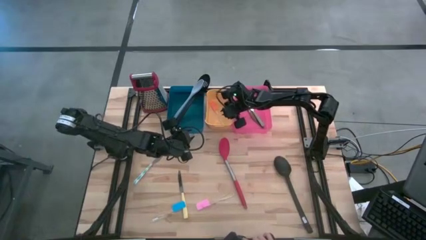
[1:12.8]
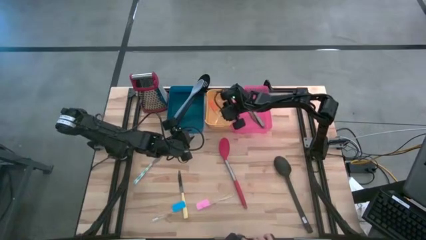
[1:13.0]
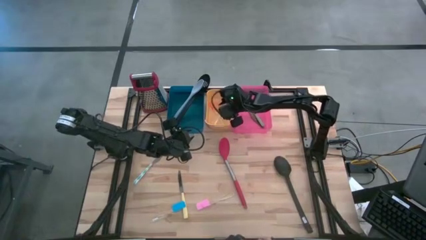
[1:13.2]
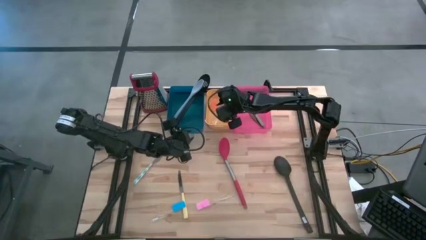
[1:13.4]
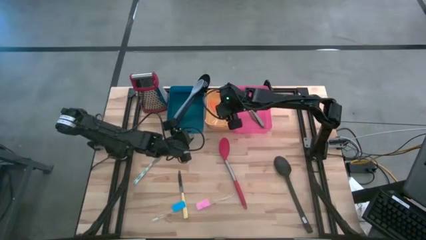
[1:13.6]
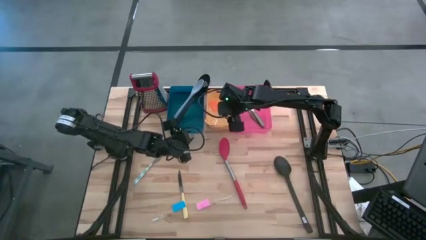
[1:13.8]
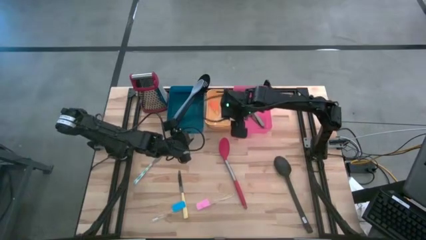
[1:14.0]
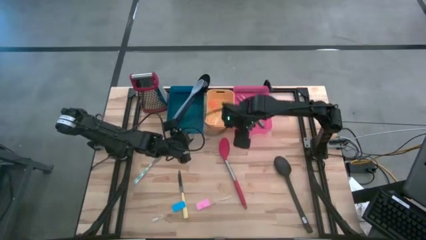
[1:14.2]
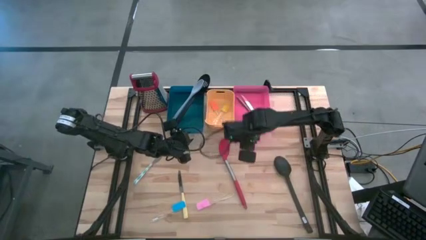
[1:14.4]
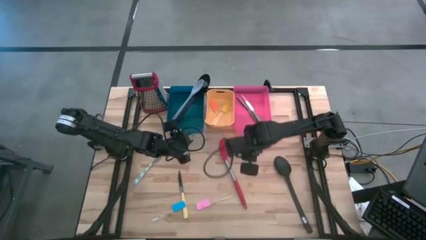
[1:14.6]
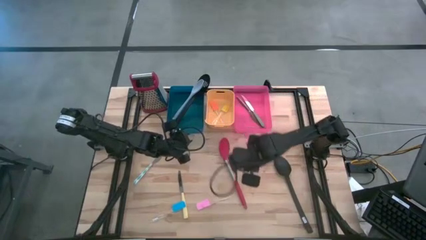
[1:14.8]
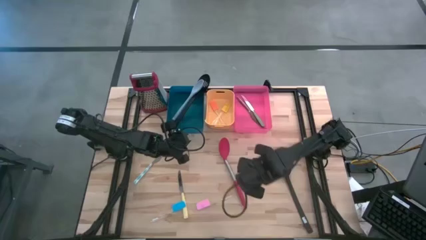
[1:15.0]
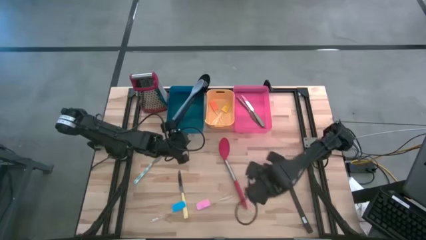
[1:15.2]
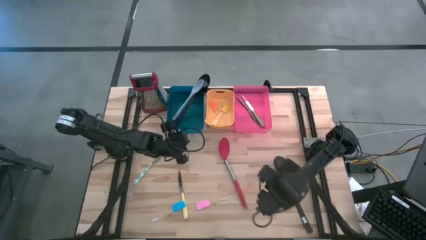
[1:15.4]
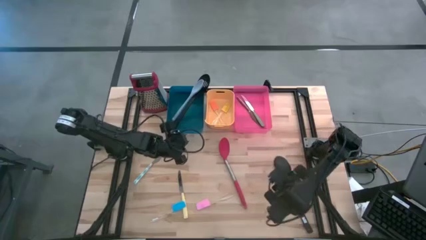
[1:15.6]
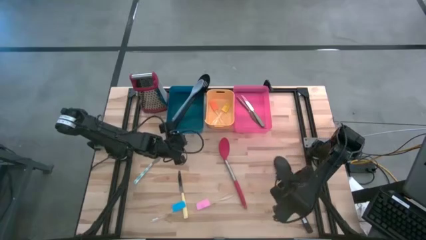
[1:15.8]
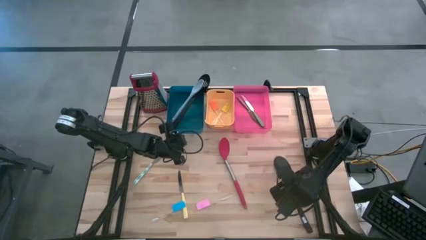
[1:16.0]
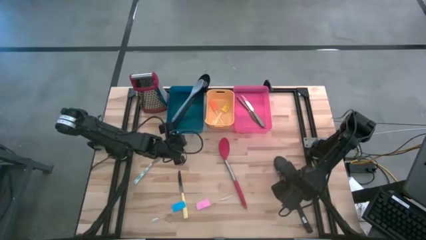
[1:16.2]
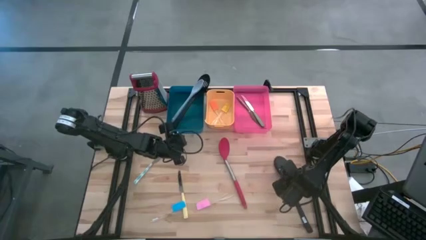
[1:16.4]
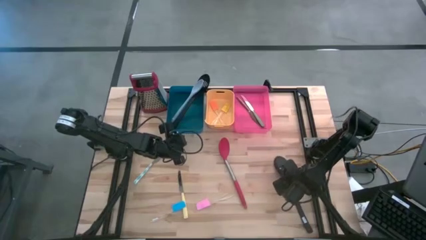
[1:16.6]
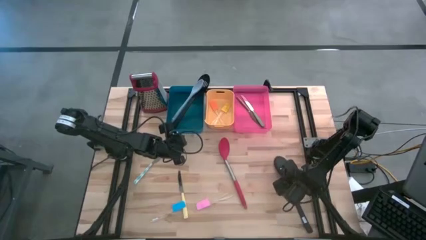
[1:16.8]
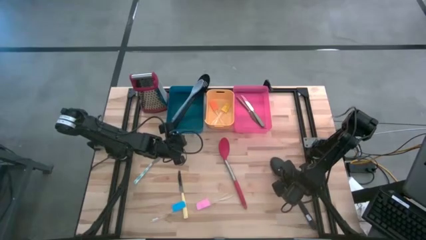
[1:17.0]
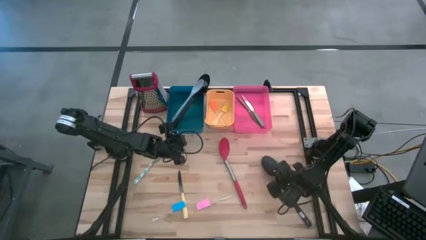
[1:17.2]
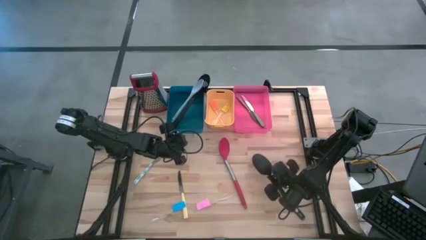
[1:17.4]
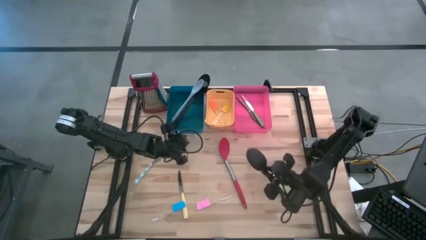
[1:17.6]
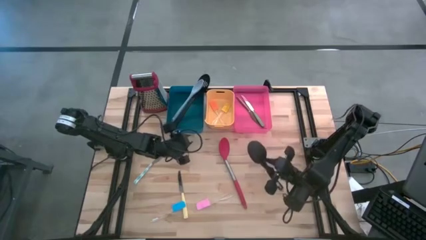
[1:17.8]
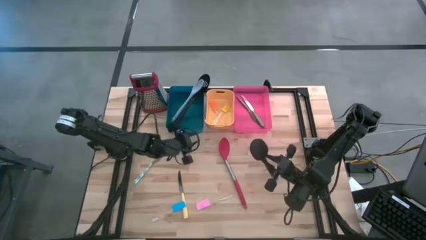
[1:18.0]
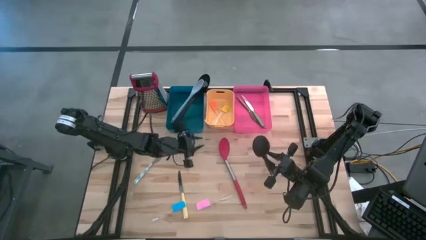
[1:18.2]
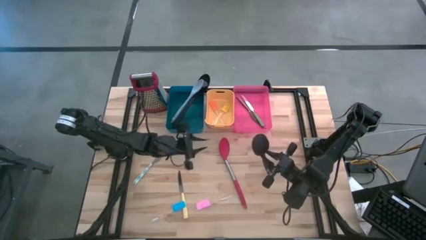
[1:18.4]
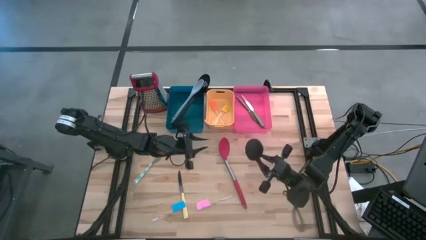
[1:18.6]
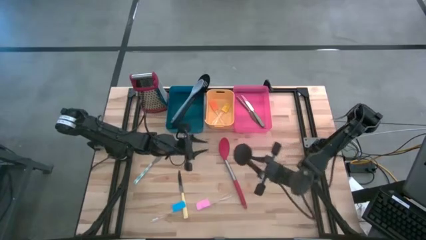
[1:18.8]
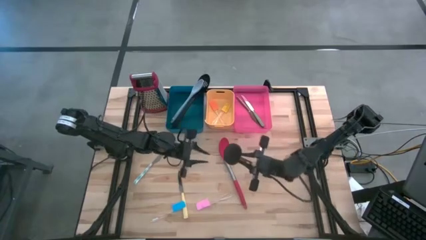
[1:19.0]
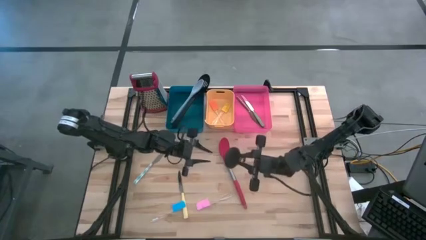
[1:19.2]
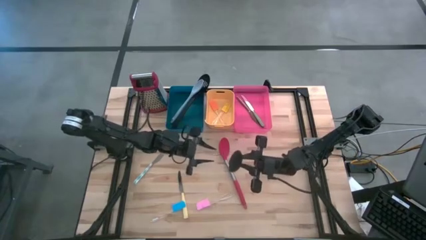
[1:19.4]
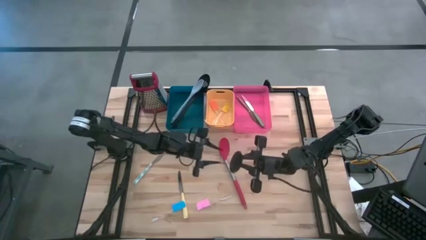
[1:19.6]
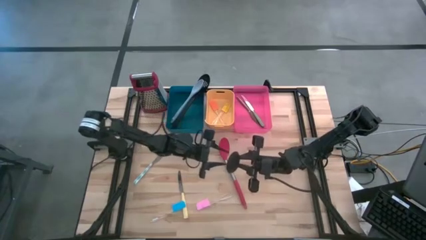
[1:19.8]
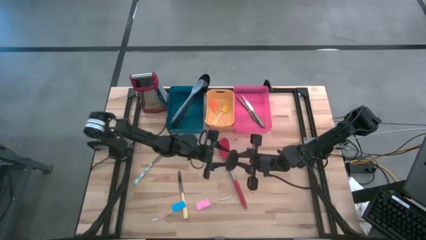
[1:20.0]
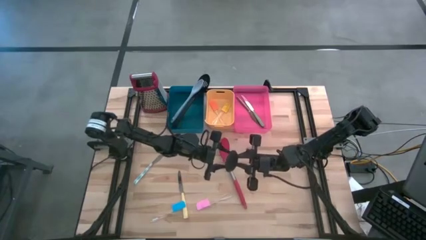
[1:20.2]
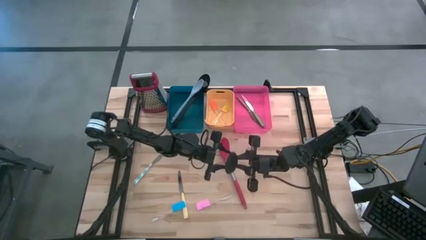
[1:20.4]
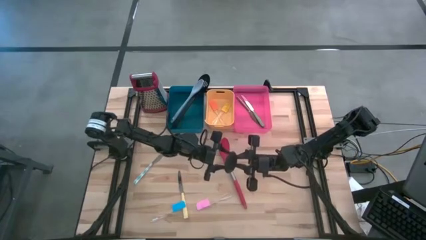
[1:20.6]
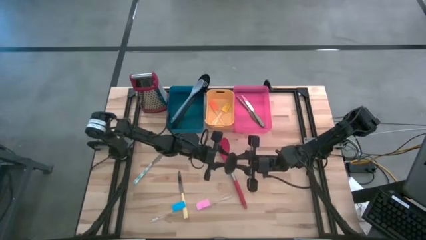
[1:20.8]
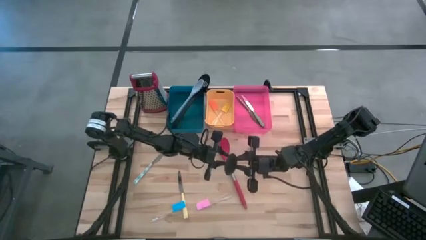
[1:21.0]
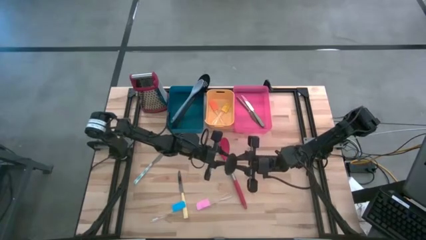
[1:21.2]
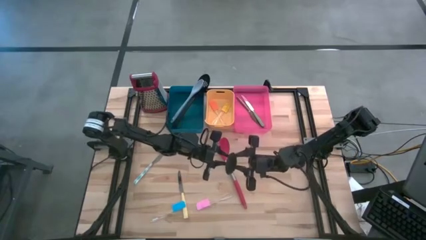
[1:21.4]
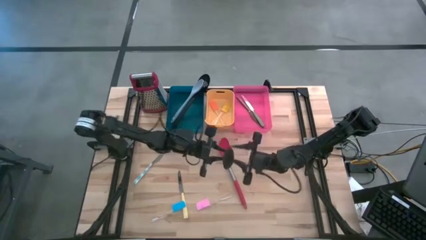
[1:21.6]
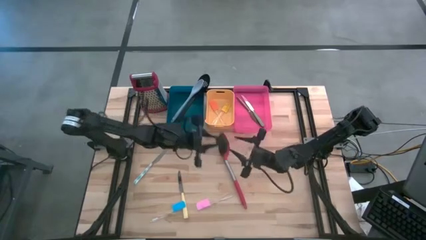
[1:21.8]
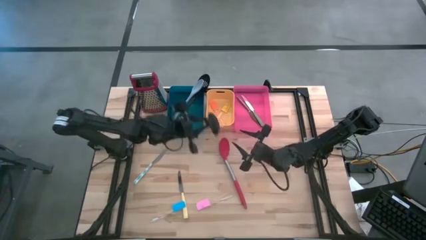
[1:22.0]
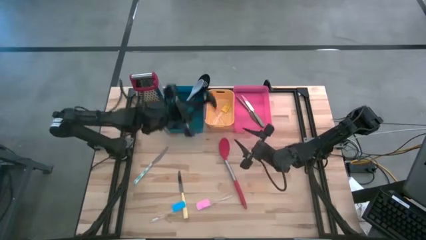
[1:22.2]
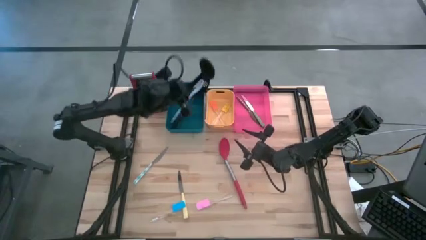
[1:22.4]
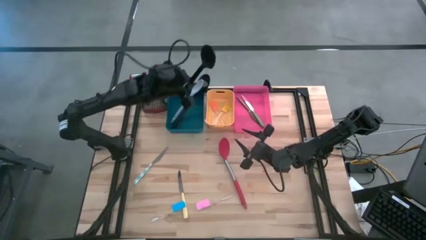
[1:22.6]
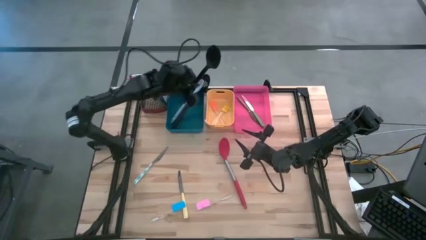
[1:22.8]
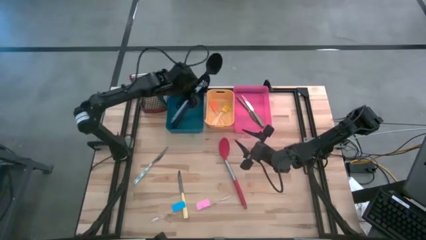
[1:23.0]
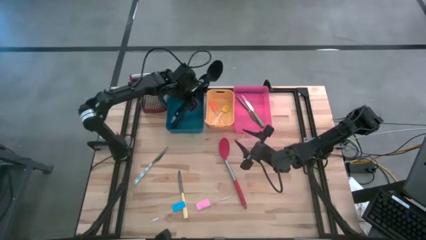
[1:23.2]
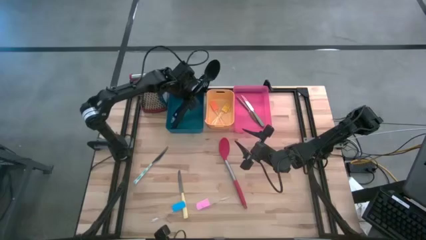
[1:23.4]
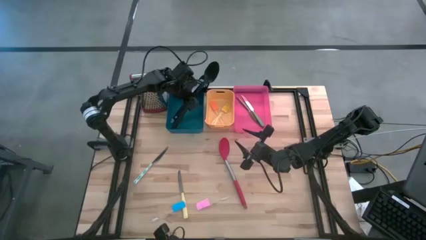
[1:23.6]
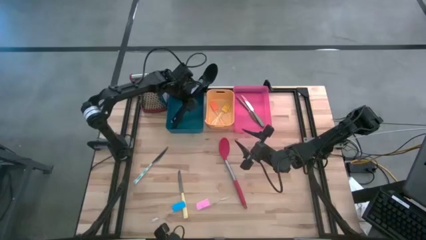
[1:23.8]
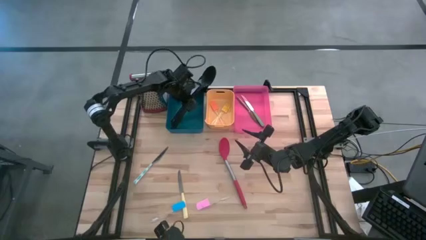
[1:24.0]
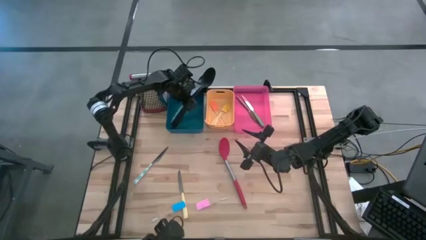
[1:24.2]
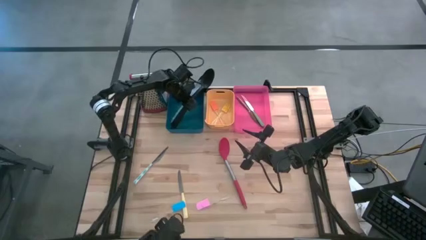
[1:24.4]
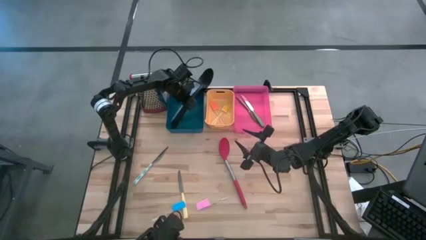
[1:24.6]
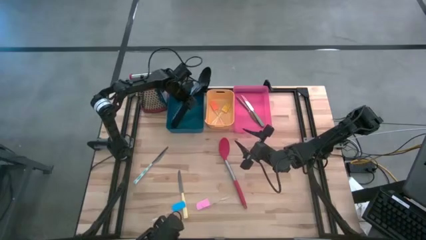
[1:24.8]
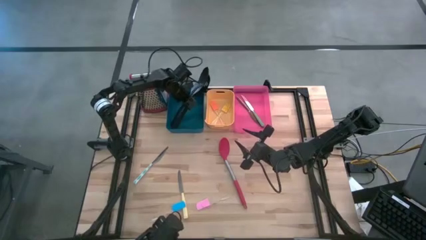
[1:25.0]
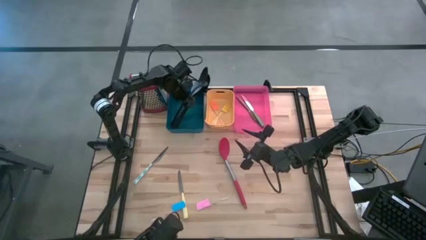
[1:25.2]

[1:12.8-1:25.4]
Task: Pick & Place Kitchen Items
Put the black serving spoon into the blue bin

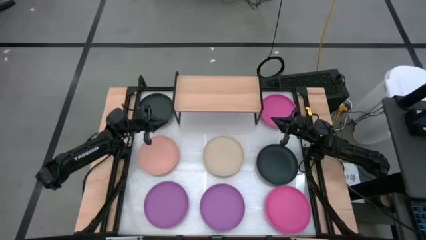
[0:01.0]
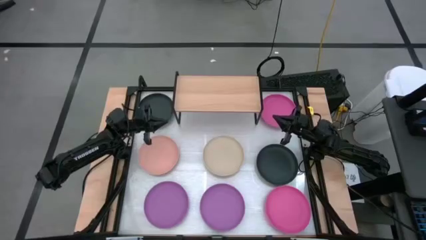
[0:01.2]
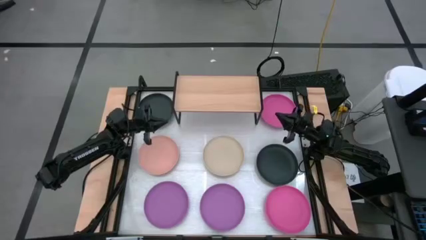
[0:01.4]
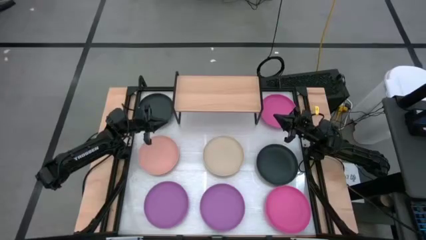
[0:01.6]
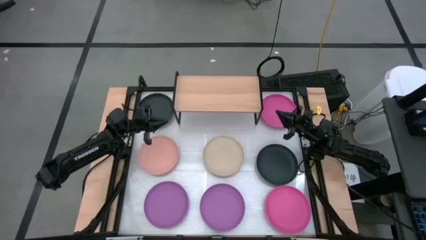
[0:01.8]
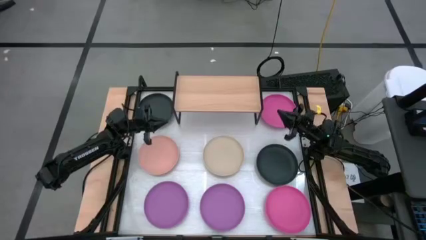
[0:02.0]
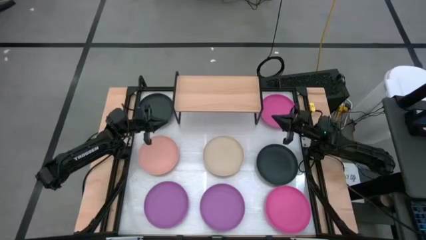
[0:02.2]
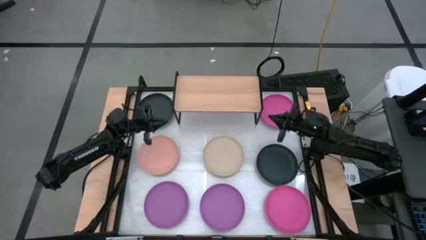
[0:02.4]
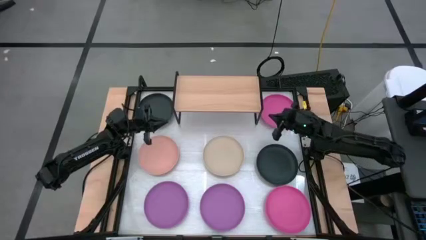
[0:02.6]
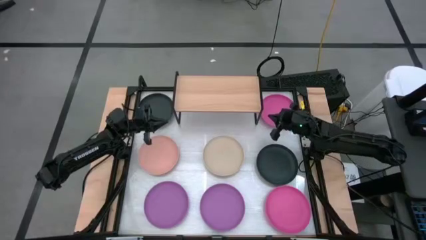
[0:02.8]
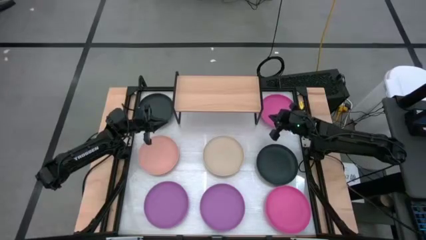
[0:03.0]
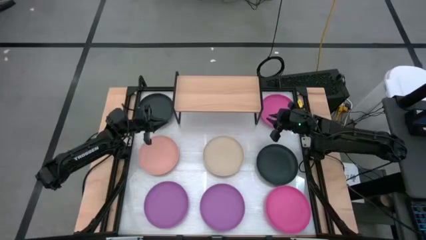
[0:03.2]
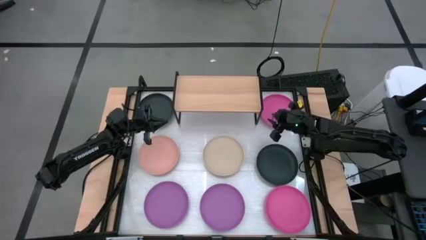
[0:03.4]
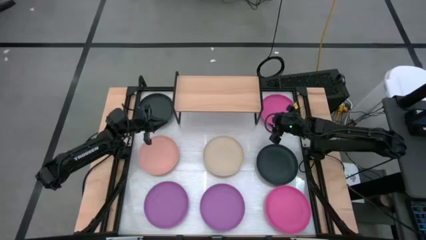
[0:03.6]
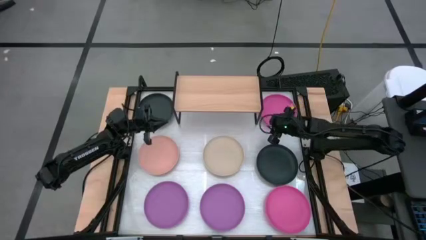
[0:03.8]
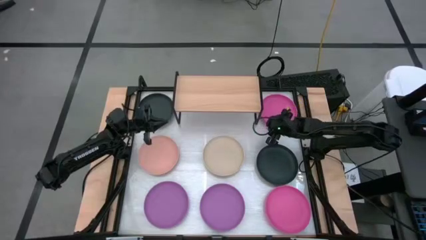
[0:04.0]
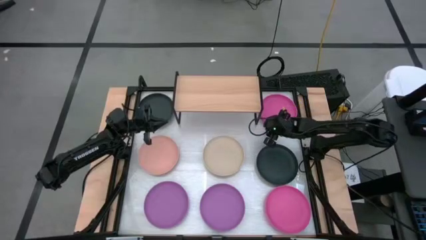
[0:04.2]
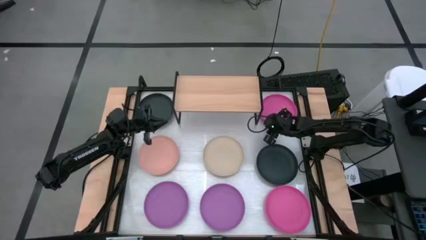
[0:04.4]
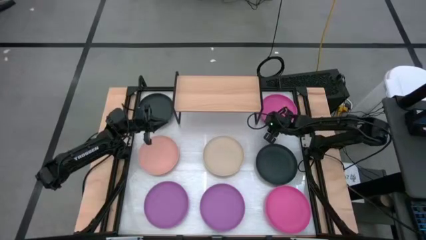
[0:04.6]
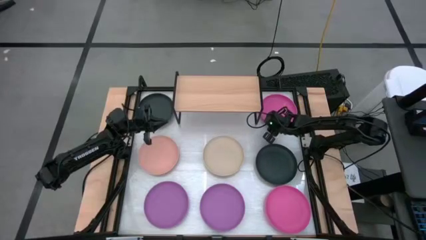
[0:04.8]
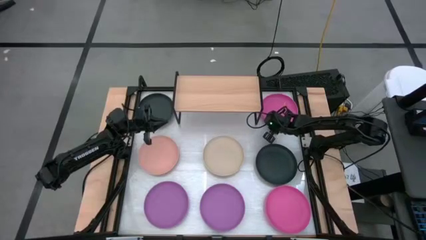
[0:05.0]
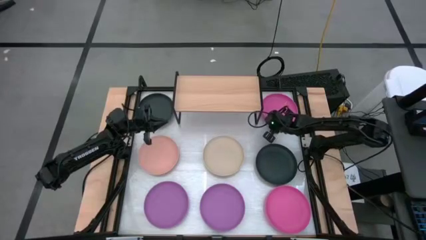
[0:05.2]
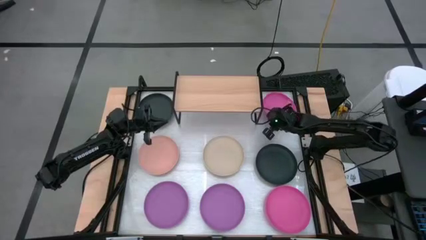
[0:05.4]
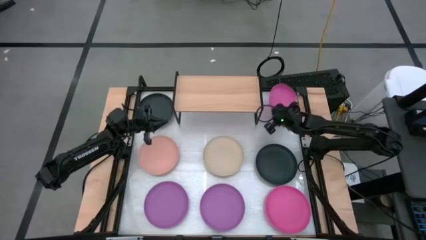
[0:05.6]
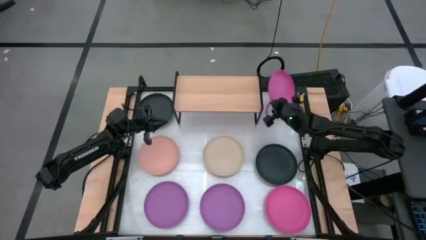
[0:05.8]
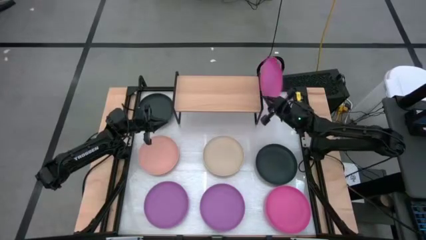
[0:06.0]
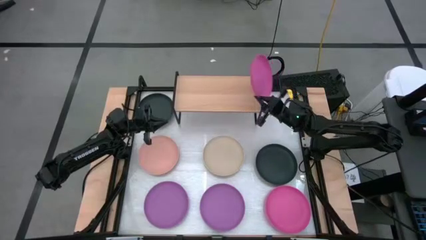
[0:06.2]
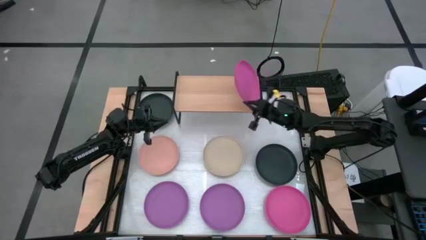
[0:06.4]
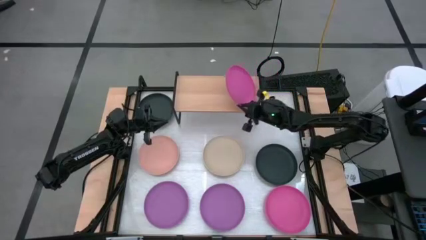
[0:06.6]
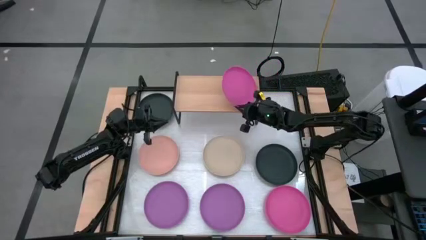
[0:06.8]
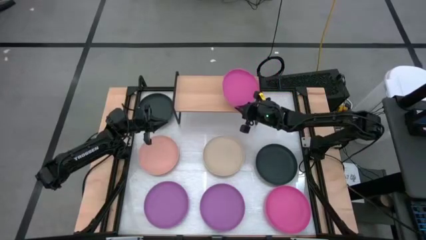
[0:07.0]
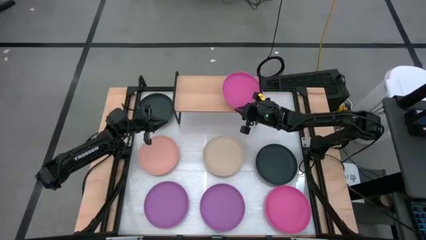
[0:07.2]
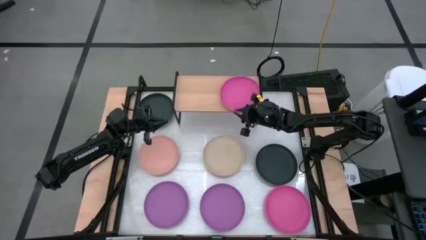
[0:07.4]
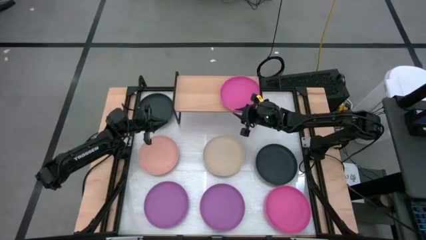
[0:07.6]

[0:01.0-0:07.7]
Task: Place and stack plates onto a shelf
Put the top pink plate on the shelf
